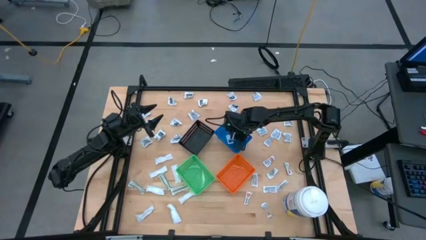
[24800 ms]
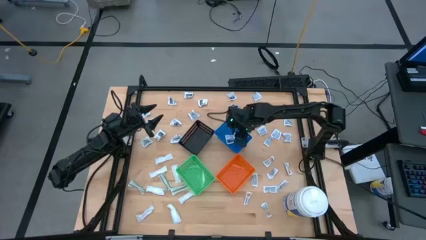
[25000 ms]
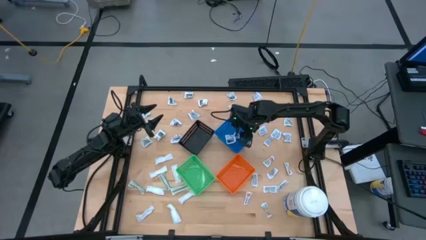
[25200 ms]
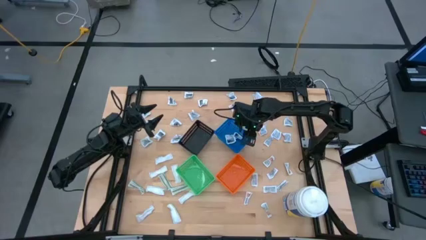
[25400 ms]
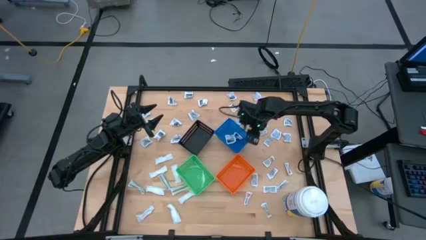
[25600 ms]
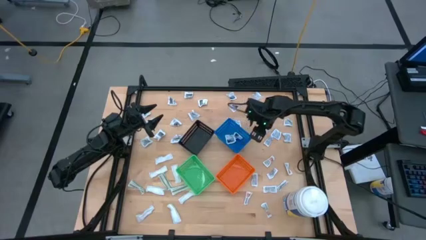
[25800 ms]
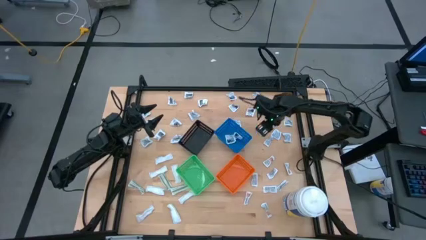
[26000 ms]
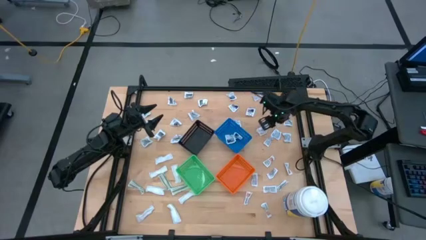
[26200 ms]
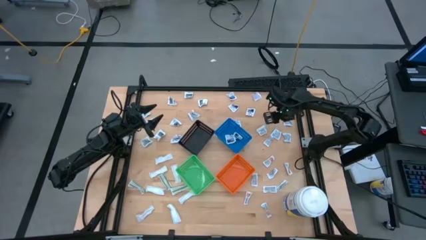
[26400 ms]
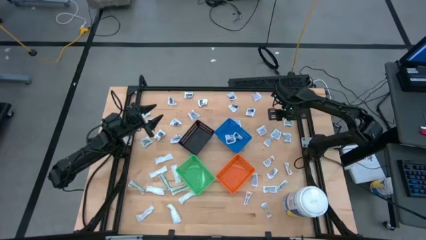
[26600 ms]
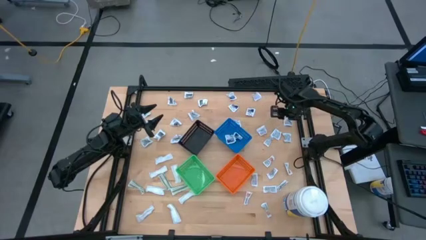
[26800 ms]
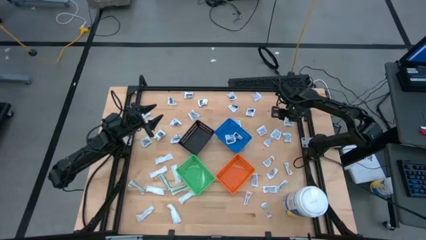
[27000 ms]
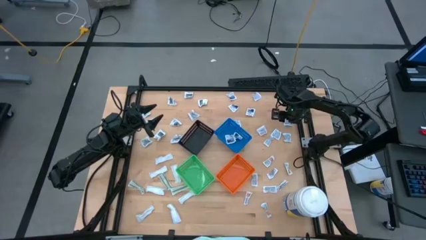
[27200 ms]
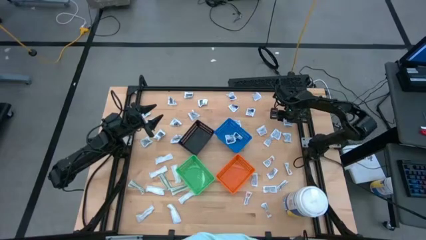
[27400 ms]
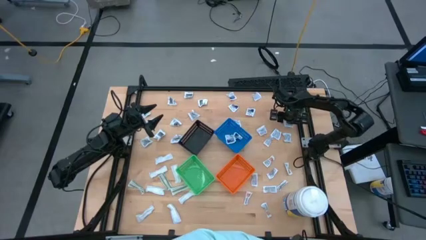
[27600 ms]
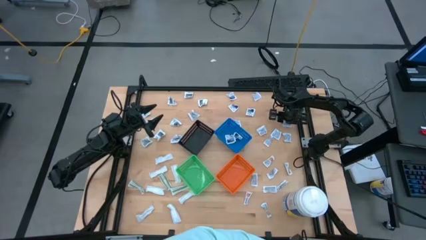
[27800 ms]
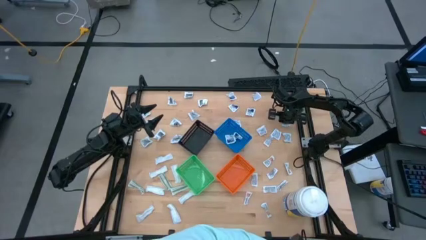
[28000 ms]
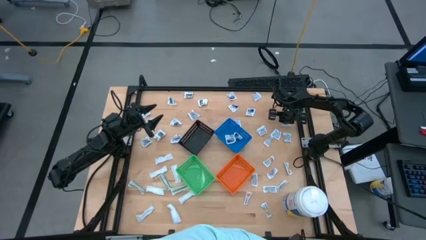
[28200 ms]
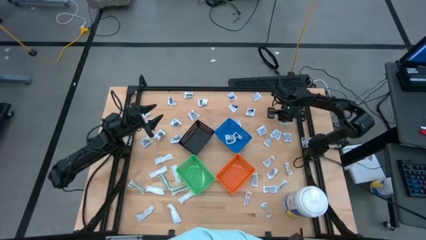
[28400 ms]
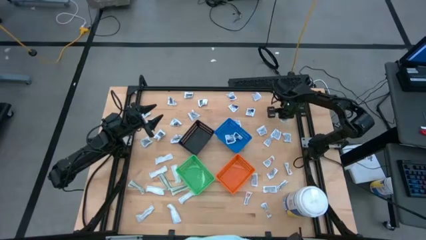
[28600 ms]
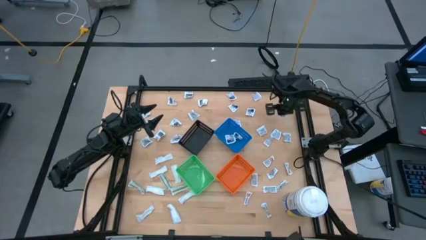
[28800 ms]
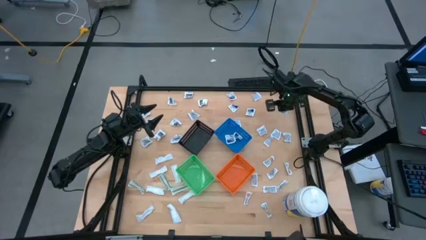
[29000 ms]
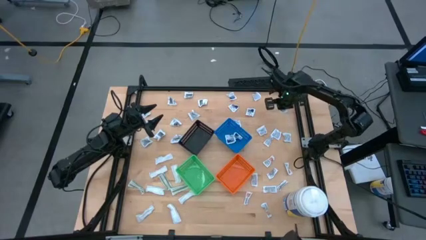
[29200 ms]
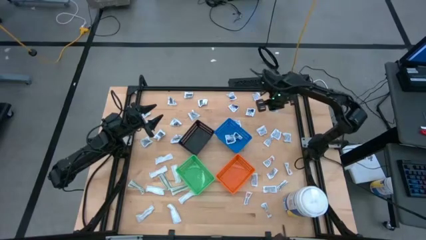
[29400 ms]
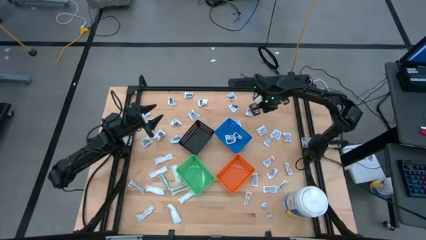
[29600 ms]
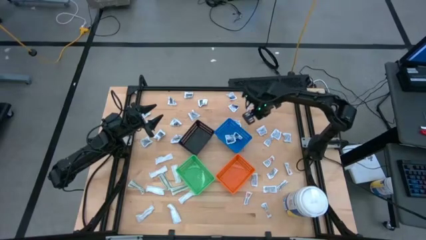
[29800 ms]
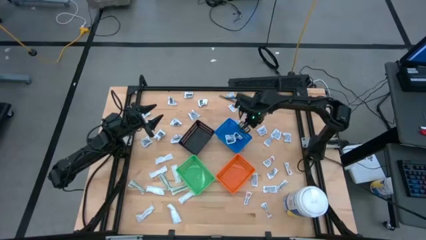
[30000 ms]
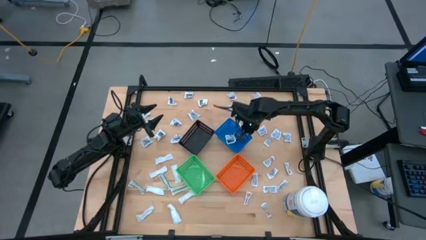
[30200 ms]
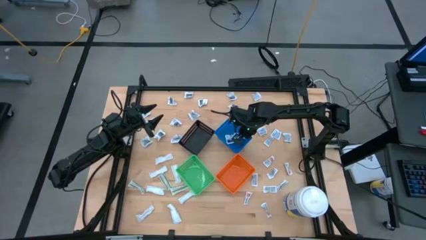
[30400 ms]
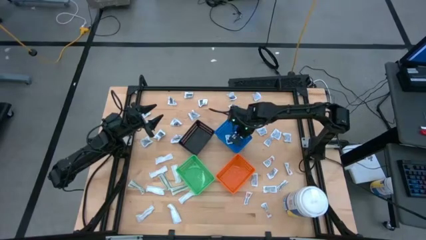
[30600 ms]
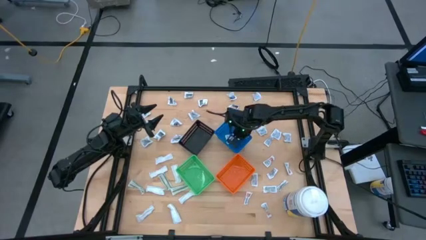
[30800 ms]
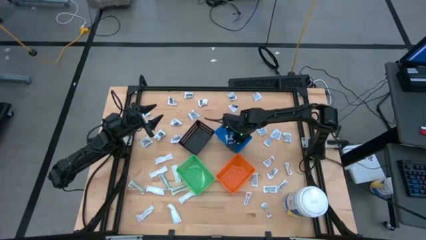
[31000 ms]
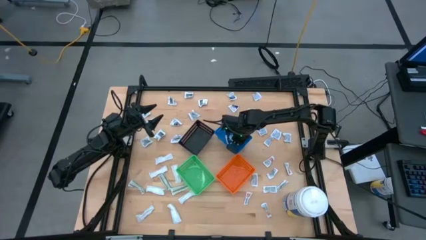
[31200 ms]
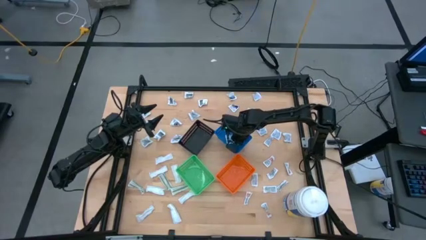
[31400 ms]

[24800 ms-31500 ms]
Task: Pick & Place First Aid Supplies
Put the blue alcohol pad into the blue bin

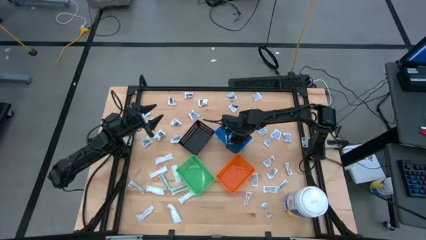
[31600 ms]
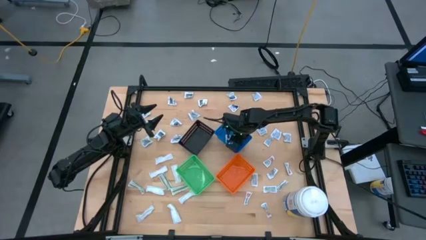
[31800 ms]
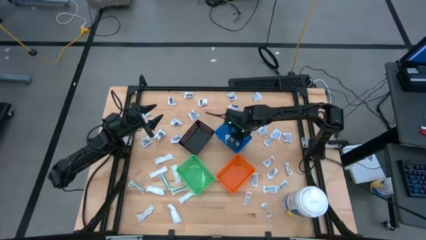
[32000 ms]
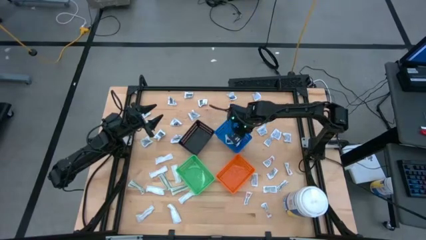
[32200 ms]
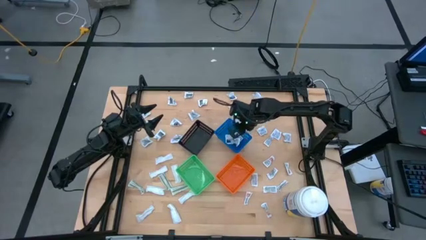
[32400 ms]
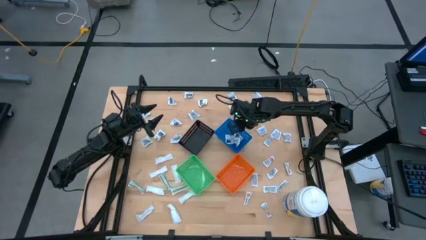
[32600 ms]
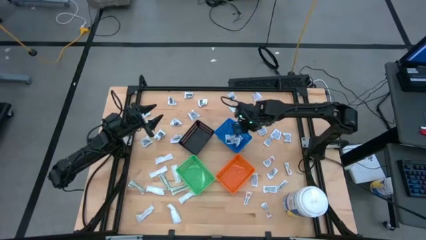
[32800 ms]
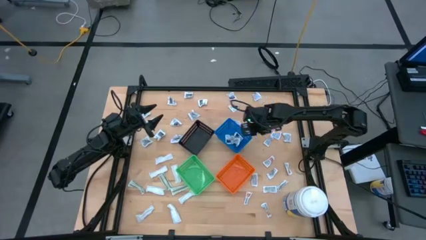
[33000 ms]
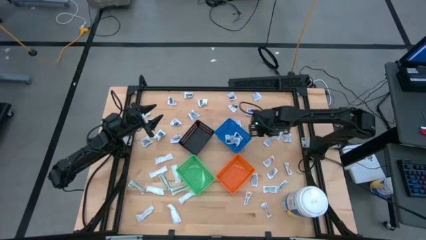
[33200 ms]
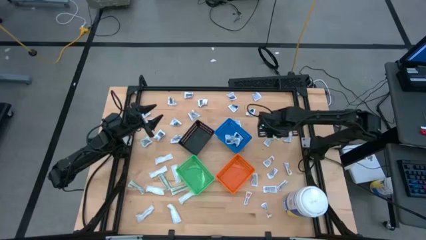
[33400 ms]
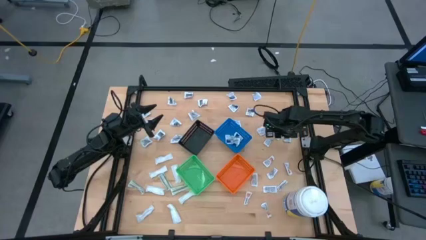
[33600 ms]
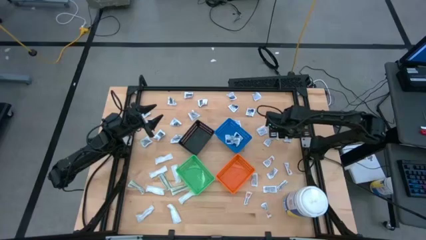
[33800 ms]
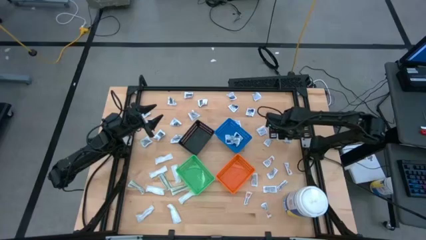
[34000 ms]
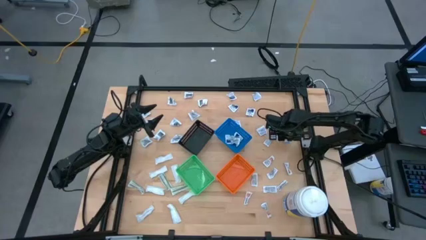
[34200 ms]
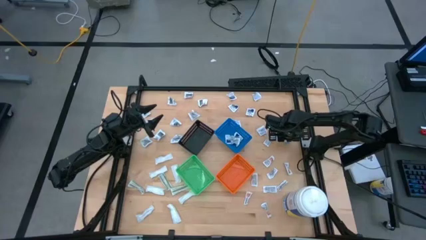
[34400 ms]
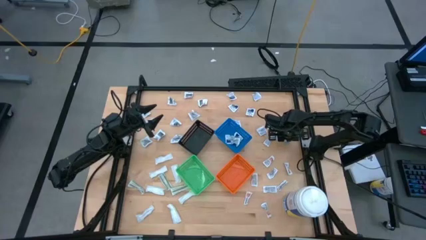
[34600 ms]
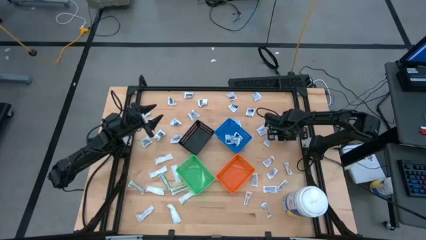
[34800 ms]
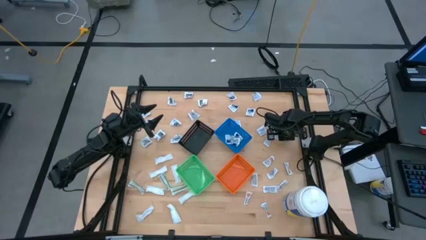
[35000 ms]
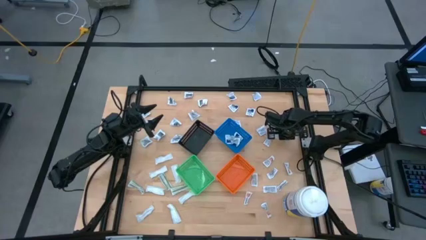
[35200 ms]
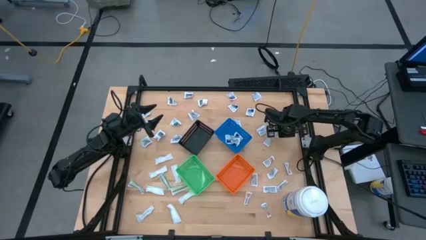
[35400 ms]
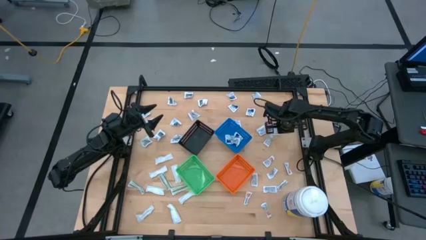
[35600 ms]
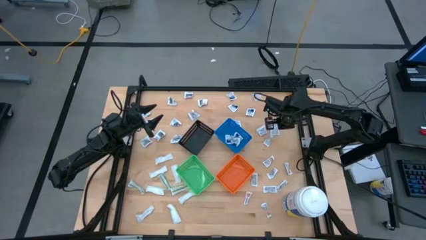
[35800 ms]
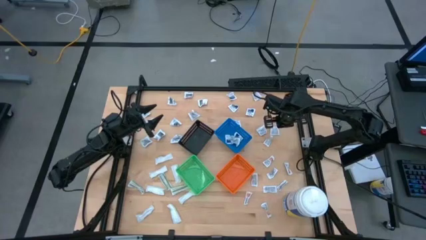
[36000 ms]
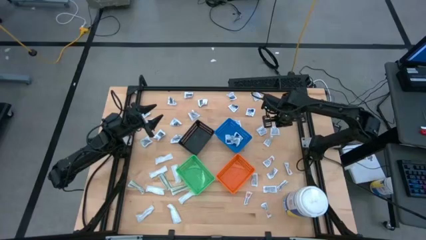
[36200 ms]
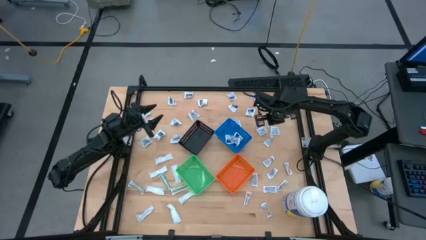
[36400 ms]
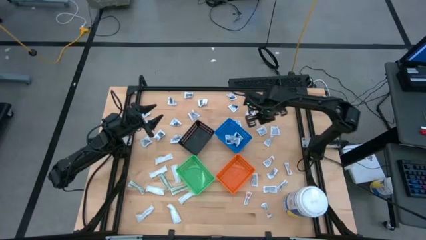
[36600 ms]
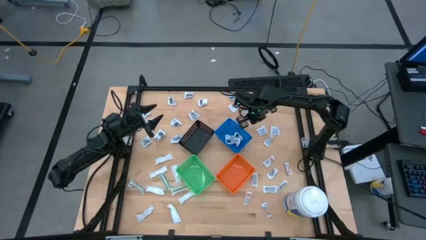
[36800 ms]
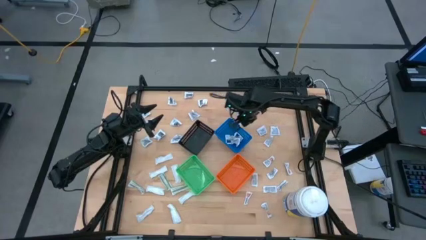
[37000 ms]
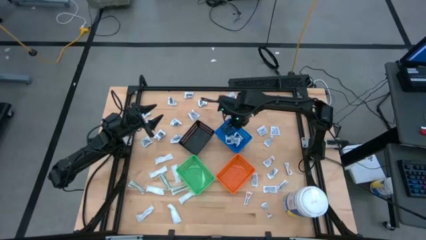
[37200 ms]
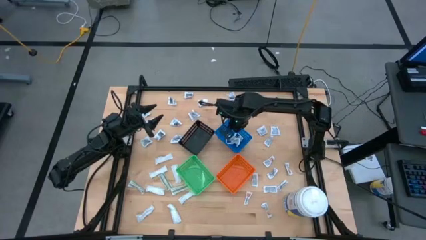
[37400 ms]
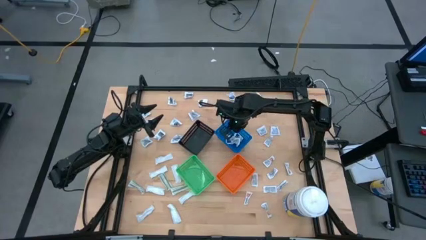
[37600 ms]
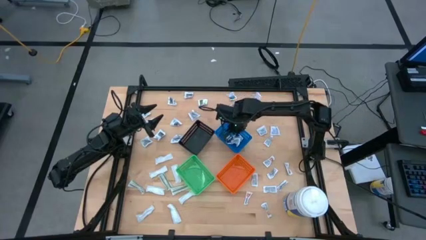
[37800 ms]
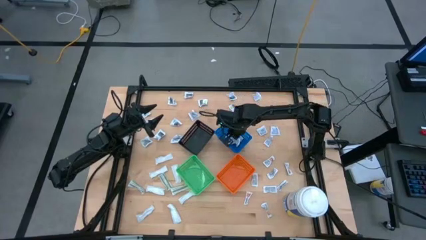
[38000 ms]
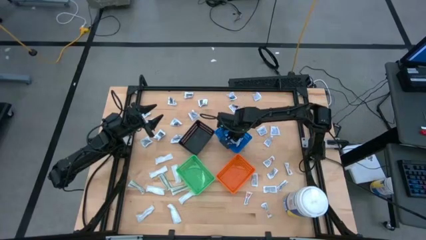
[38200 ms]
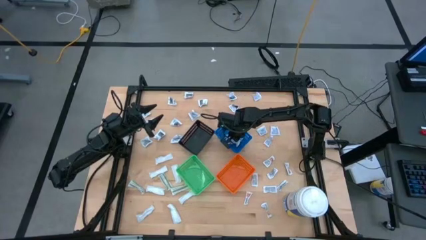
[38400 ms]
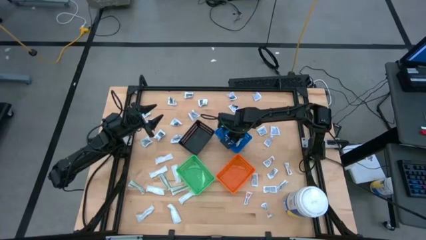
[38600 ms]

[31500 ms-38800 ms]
Put the blue alcohol pad into the blue bin

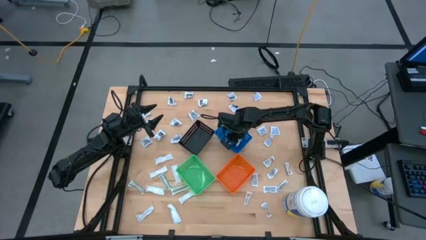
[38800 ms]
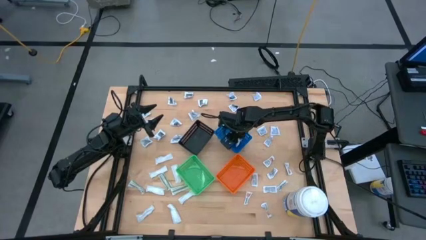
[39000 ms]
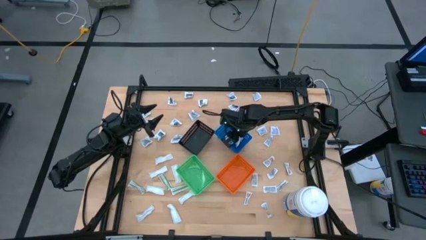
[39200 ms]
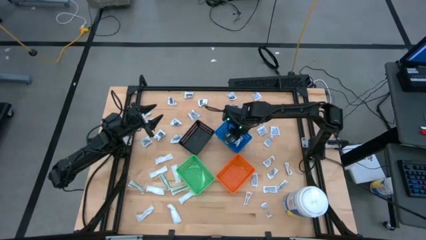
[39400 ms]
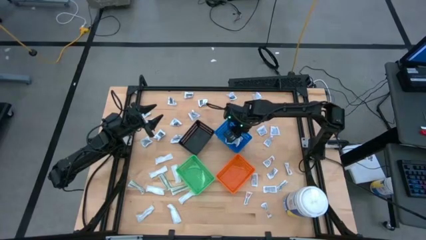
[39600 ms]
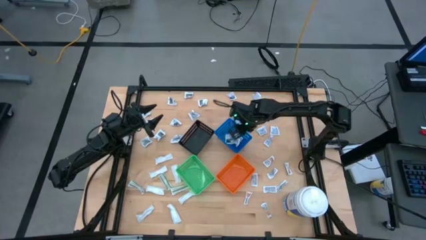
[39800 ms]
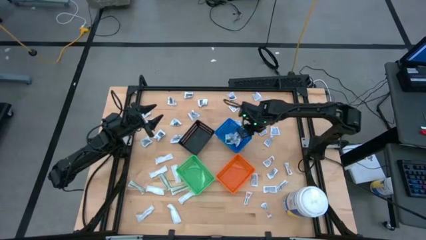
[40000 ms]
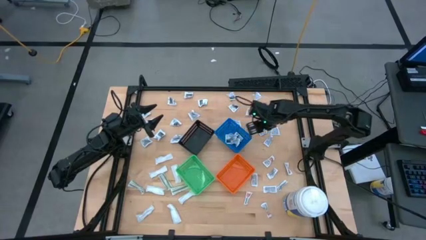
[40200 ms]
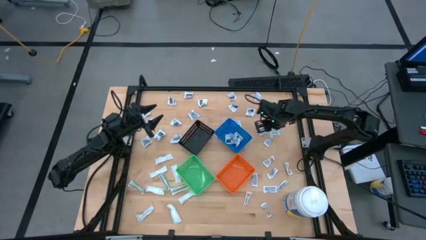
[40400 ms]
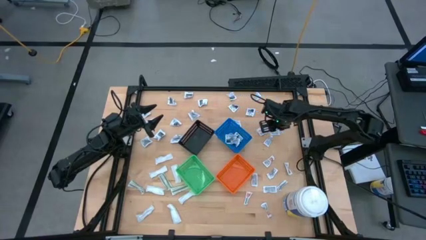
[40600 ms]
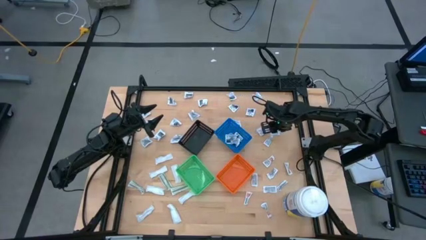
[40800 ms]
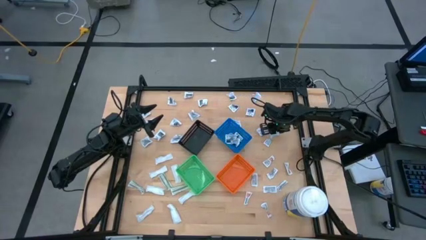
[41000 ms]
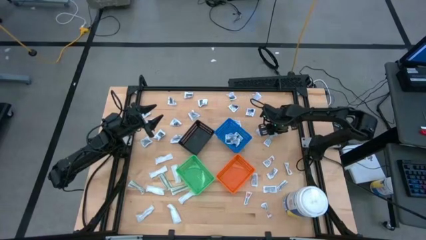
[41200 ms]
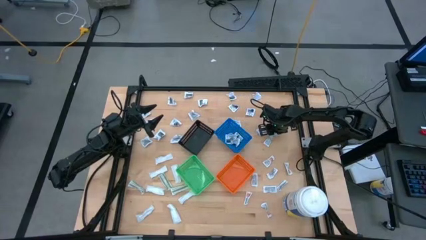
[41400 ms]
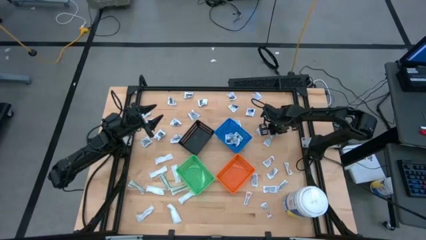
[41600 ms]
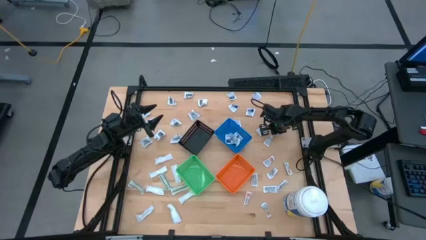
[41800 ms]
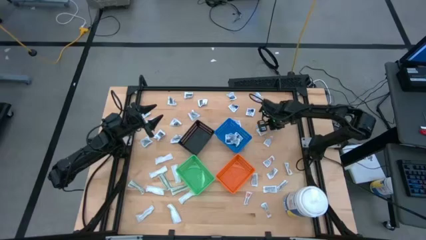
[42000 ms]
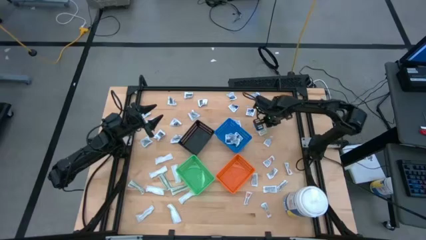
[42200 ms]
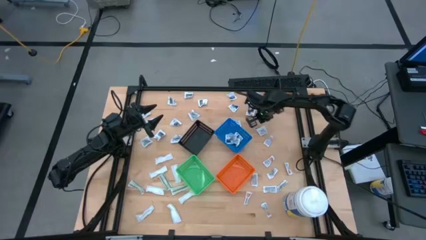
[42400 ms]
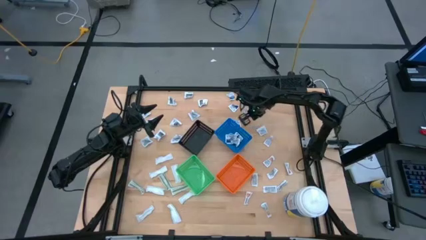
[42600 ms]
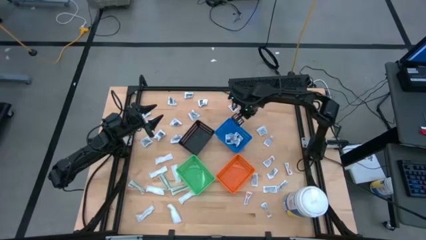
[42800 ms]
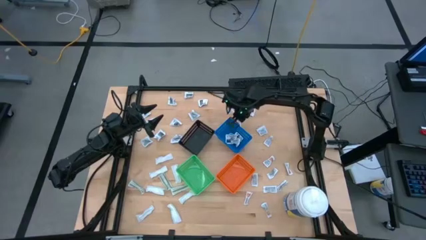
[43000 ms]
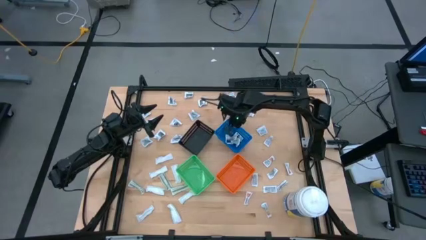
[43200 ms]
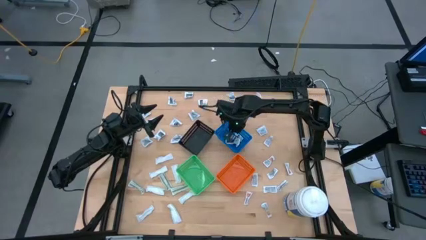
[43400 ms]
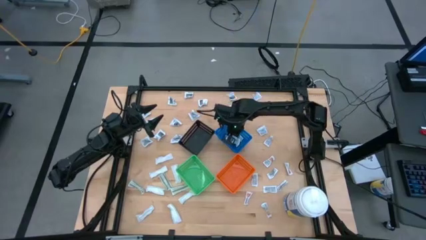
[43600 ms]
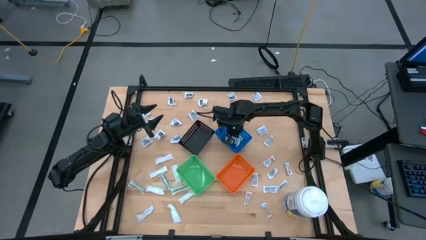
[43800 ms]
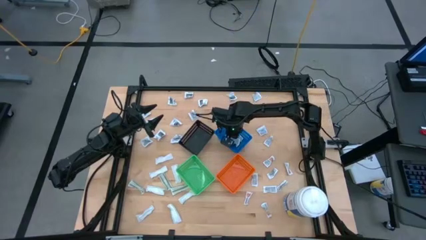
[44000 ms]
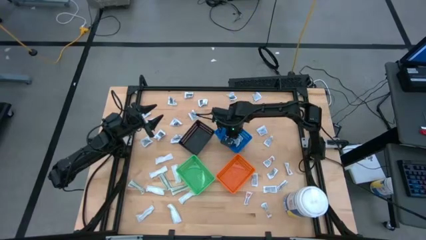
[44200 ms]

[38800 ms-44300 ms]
Put the blue alcohol pad into the blue bin
